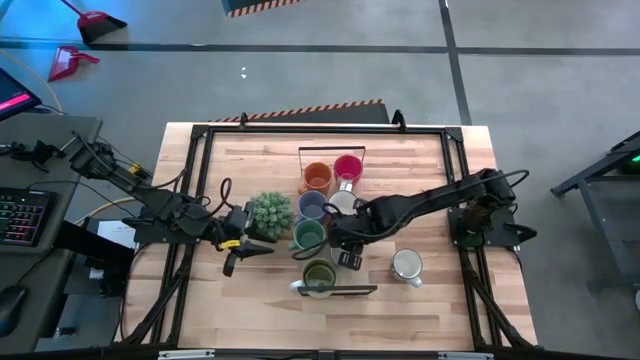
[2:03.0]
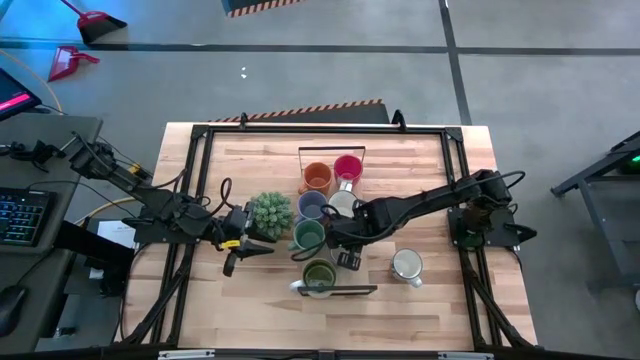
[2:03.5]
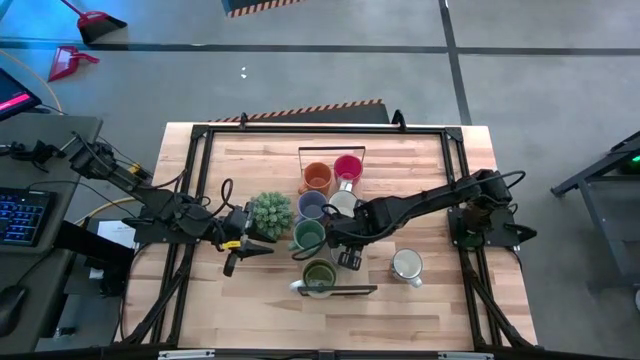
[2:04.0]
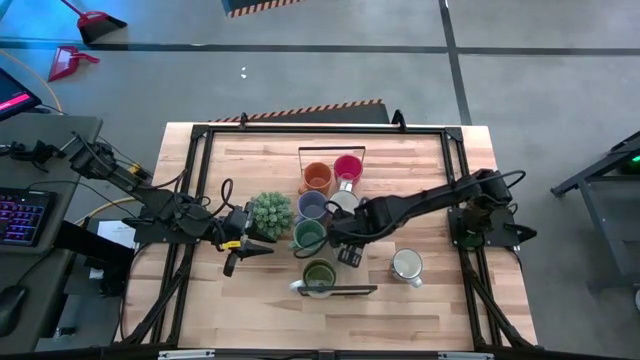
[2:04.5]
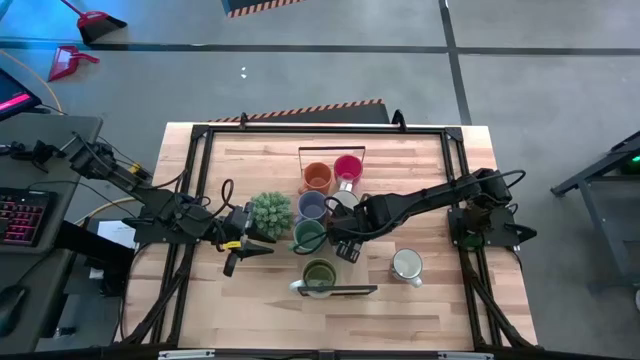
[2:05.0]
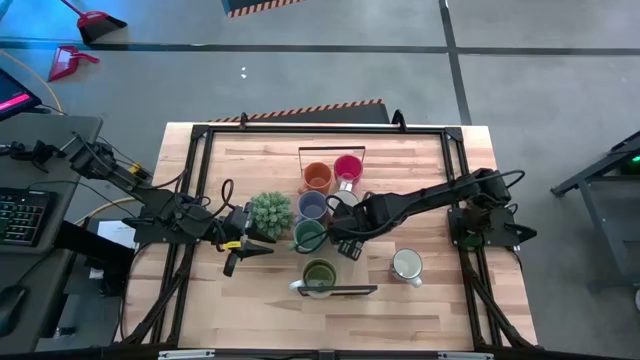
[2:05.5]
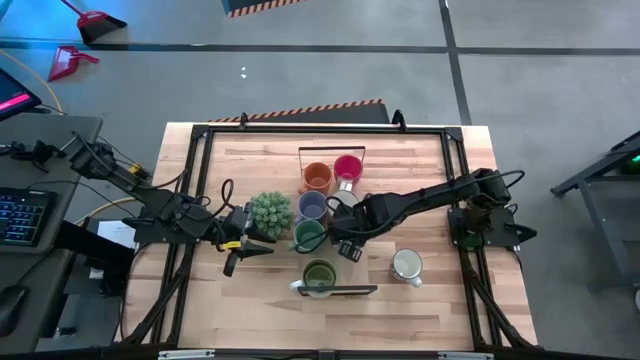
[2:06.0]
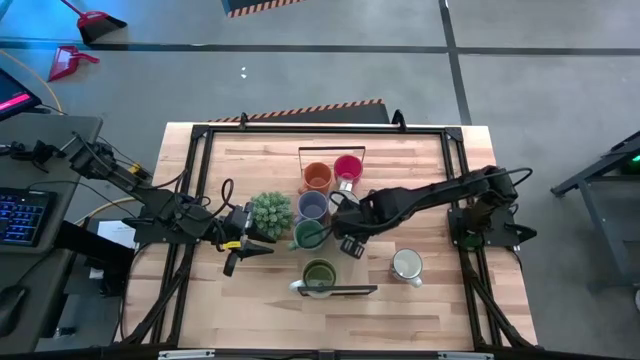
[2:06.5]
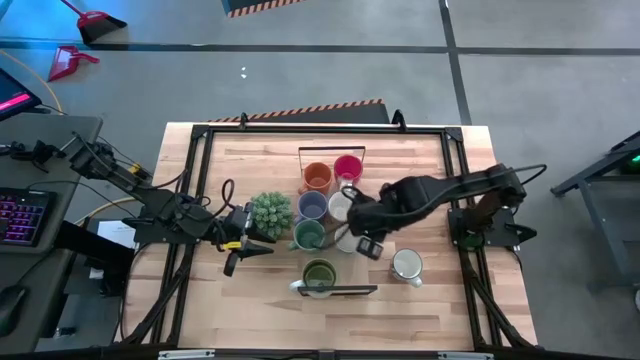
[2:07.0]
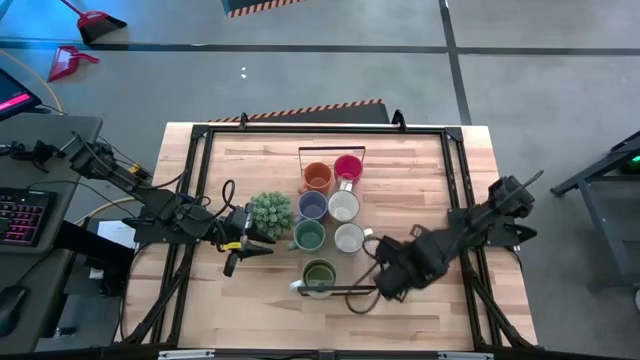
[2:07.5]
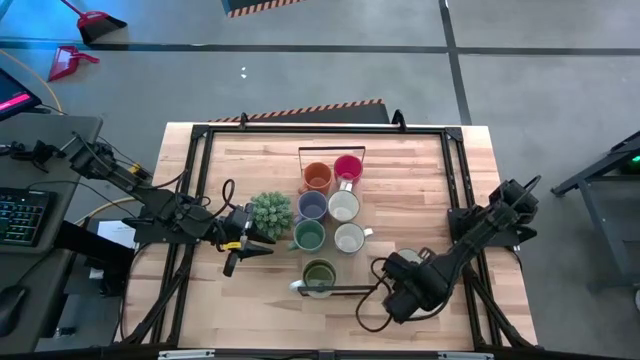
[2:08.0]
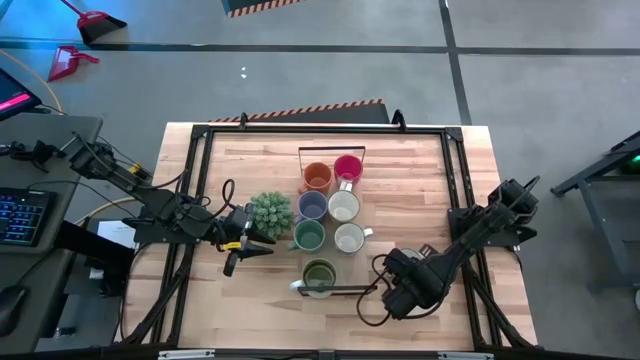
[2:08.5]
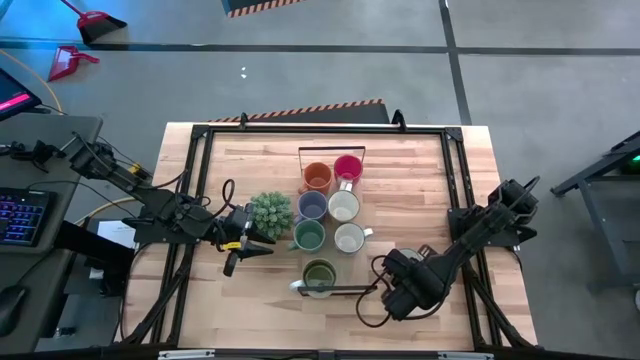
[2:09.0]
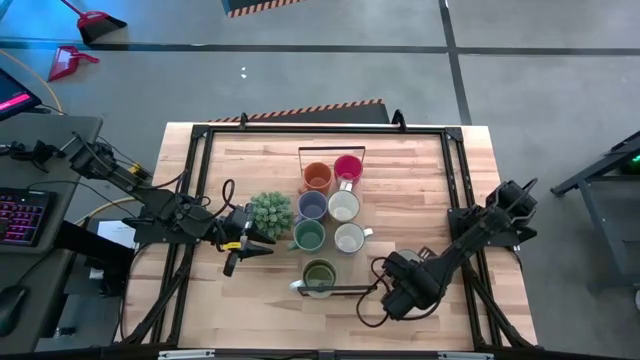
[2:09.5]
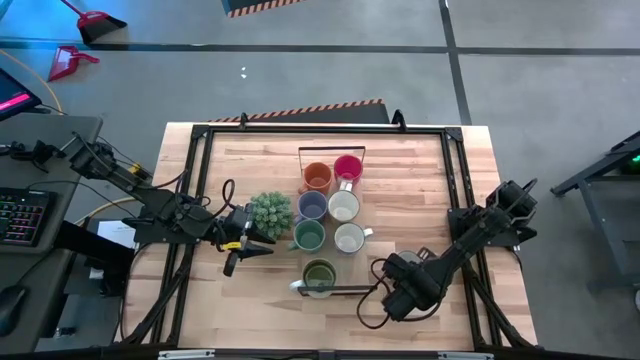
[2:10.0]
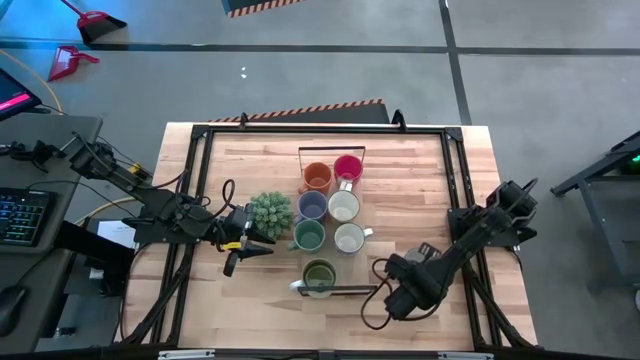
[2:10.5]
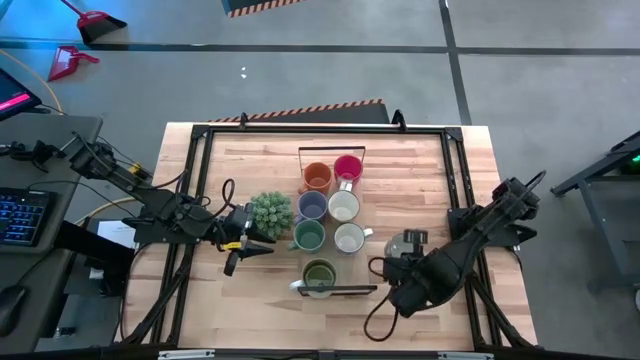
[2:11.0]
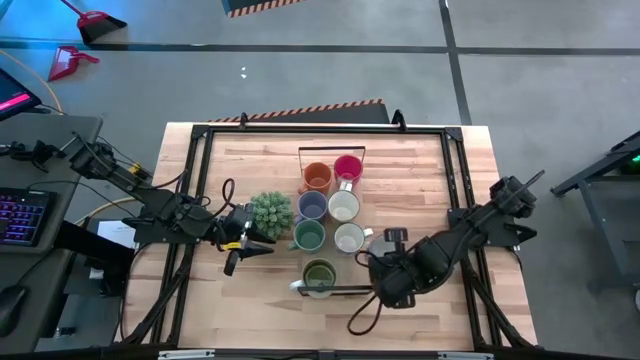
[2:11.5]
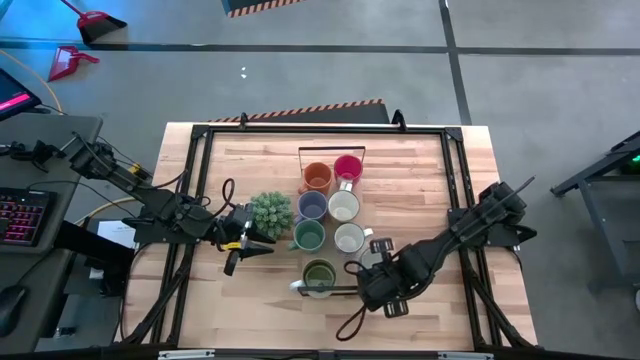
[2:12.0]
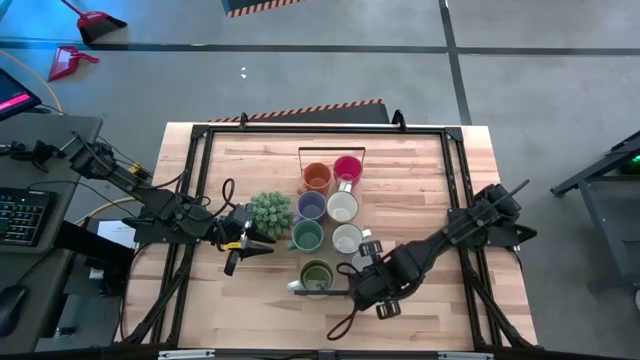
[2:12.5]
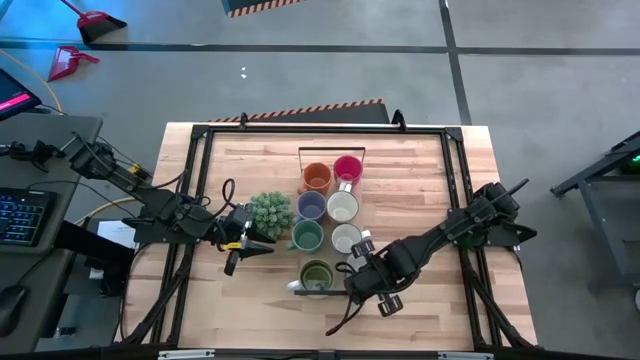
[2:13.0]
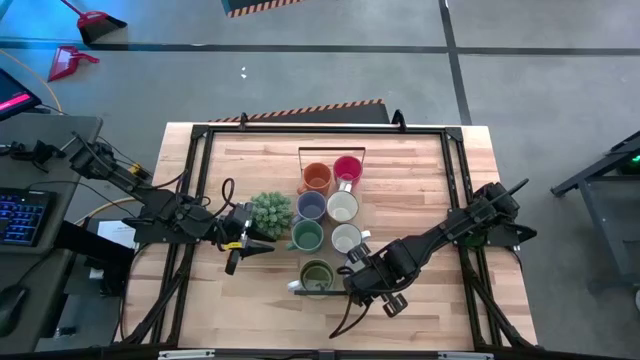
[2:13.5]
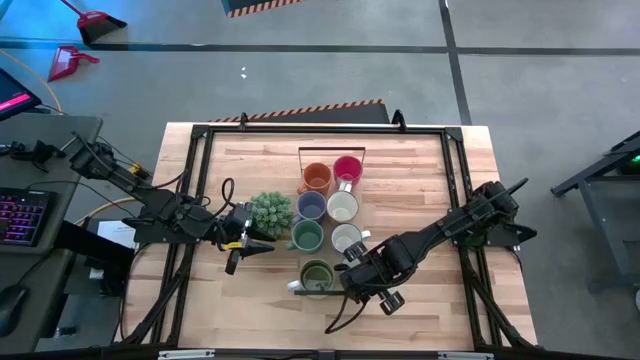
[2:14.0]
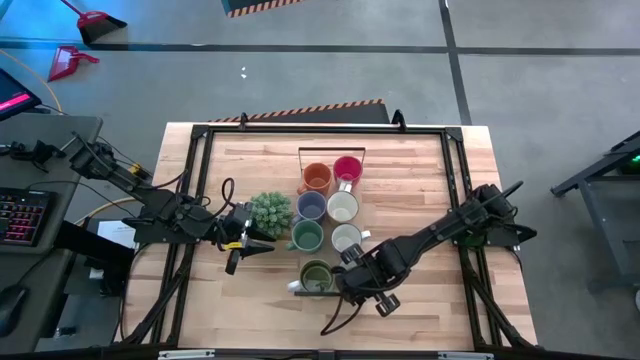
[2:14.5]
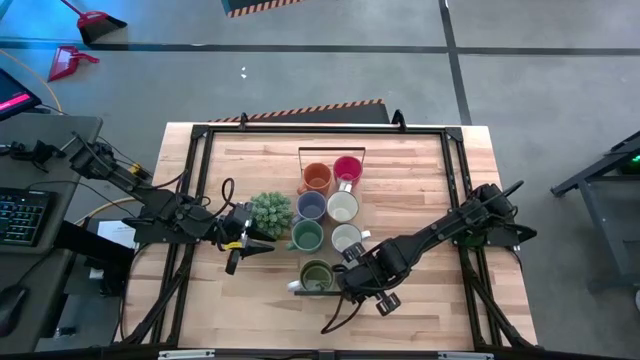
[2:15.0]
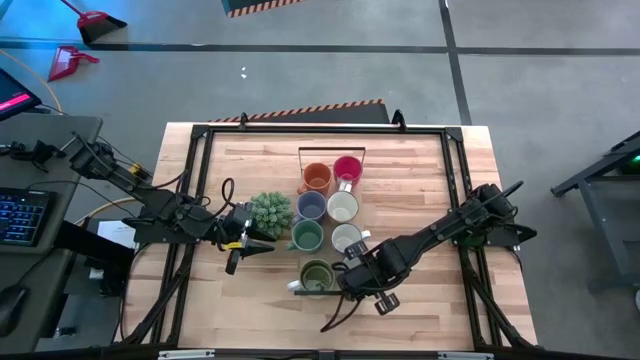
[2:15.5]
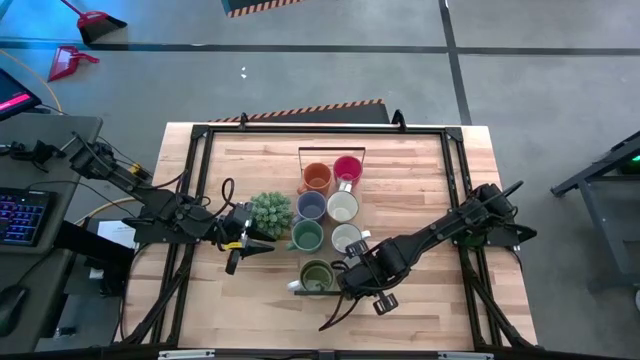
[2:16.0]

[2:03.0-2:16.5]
Task: Place coffee mugs
Put the blue mug on the shelf

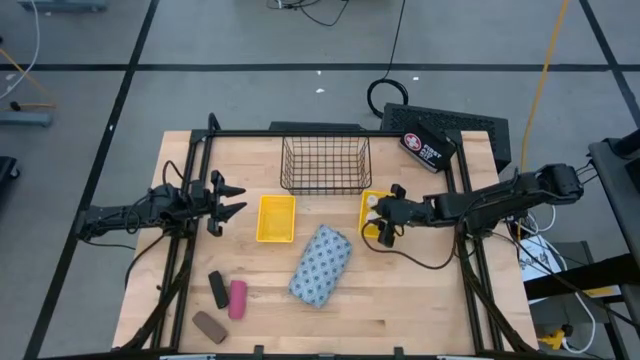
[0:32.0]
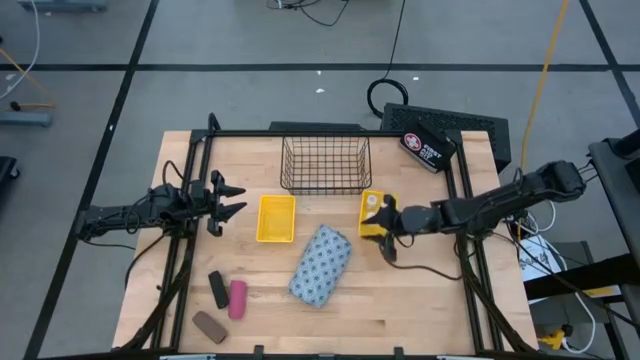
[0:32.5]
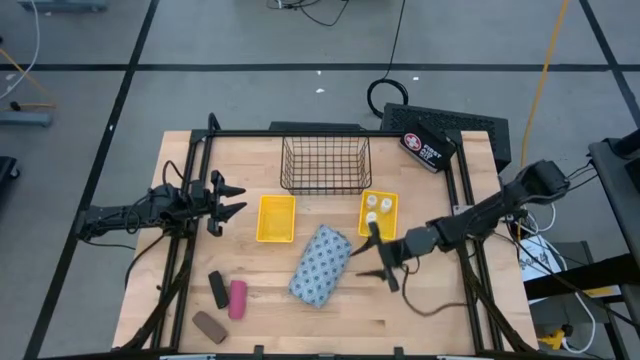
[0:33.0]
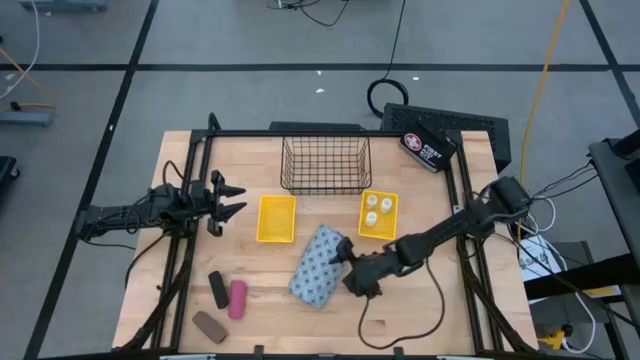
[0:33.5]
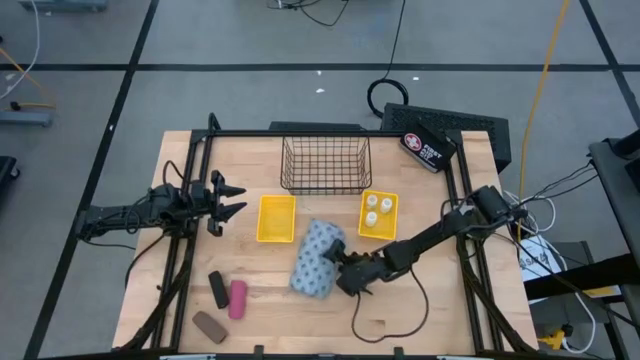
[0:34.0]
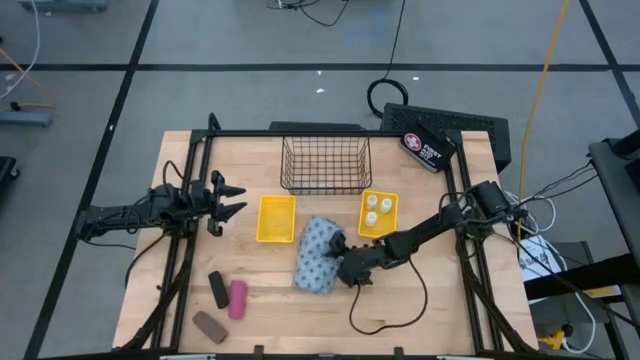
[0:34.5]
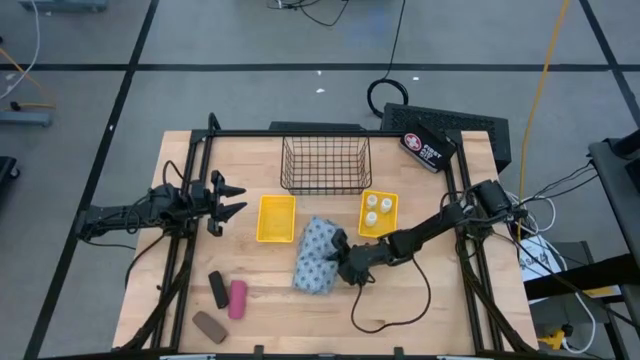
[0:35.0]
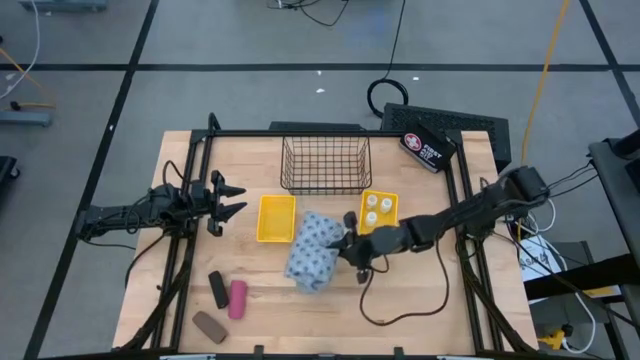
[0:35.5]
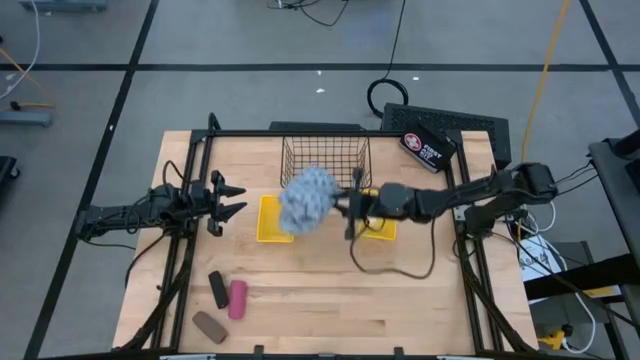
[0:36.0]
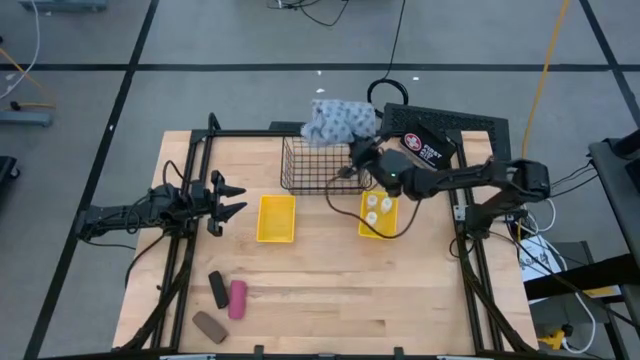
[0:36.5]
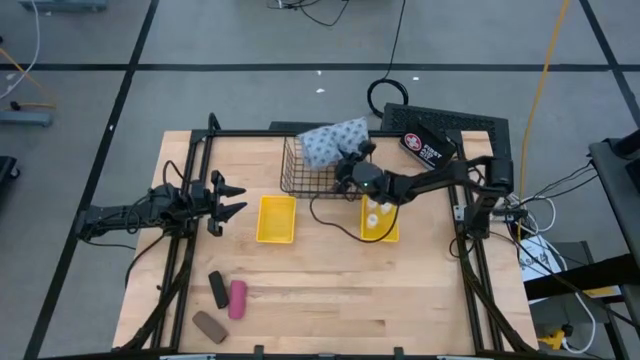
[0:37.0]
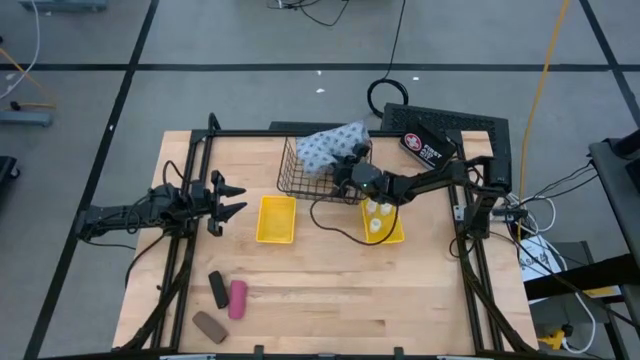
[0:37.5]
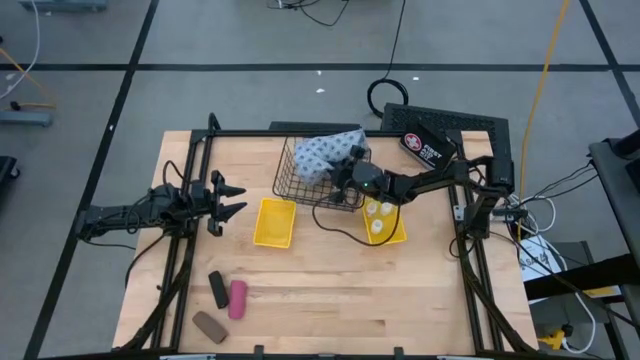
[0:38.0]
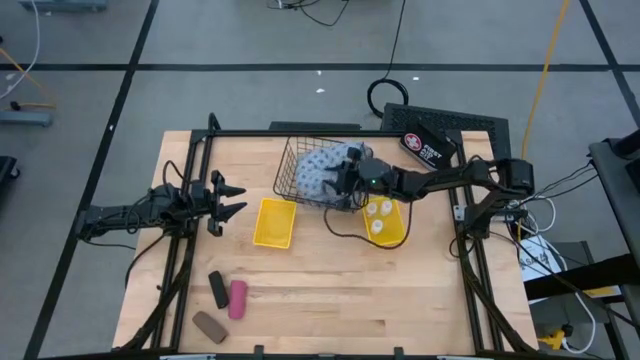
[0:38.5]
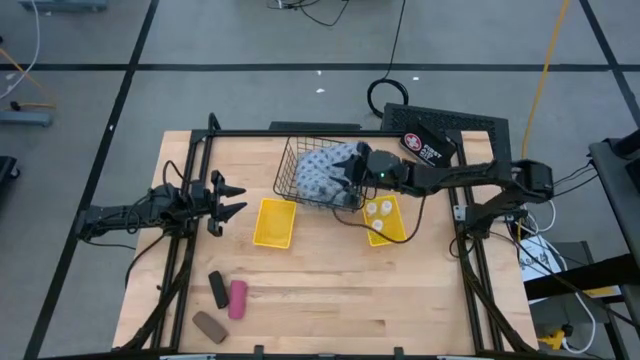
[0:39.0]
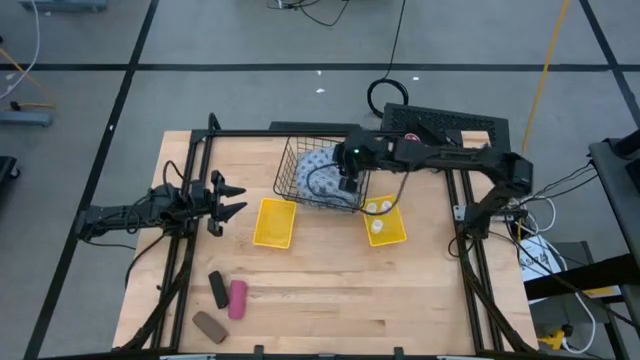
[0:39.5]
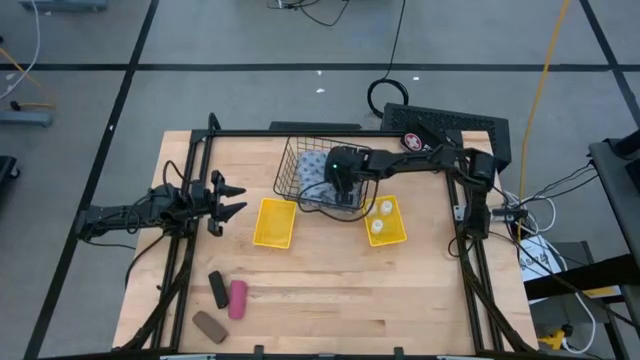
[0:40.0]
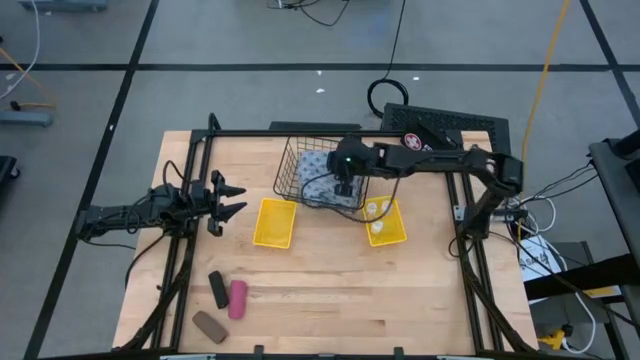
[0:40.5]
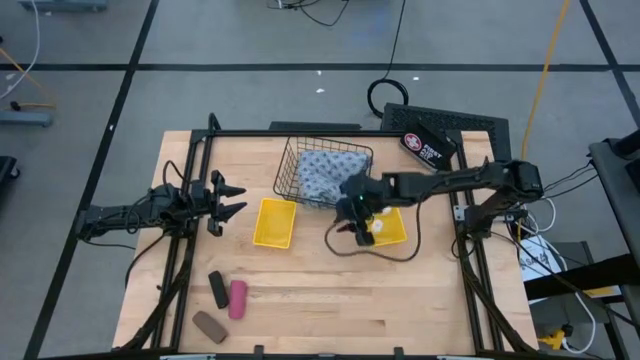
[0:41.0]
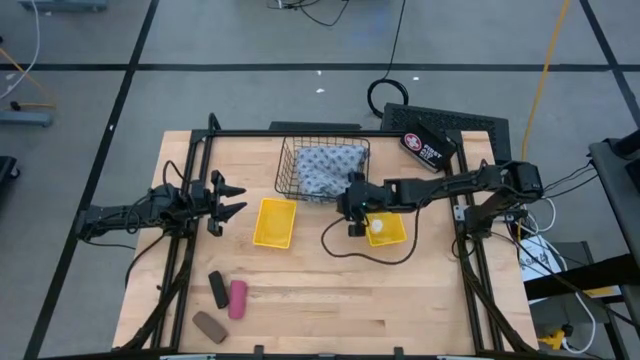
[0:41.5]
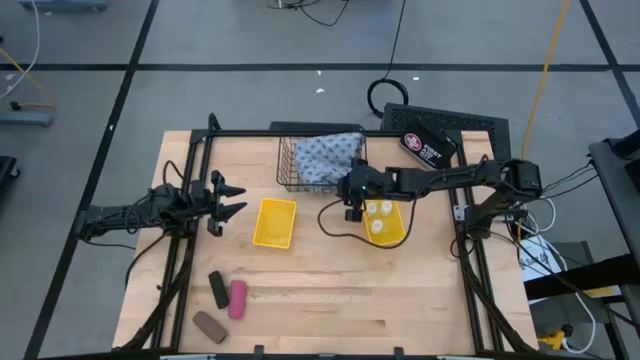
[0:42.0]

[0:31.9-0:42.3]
Task: Pick & Place Medicine items
Put the blue patient gown into the wire basket
